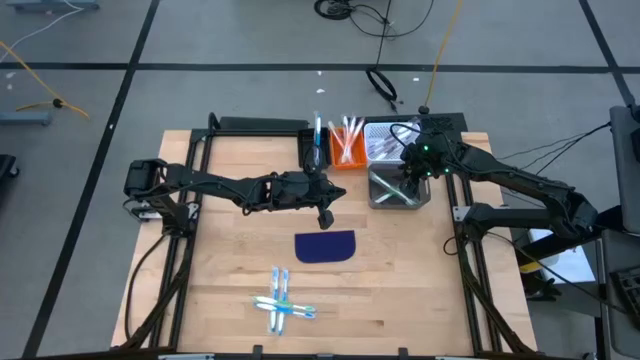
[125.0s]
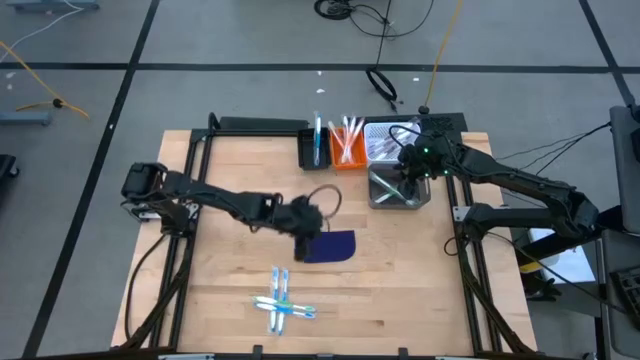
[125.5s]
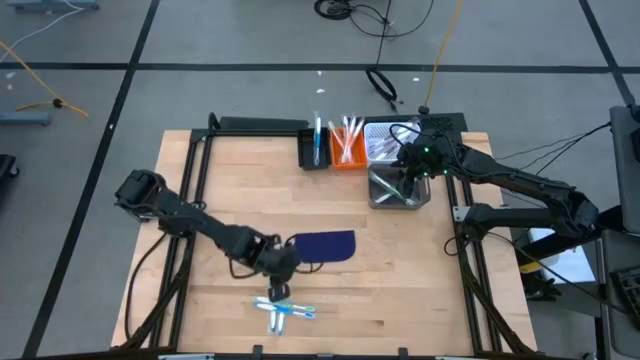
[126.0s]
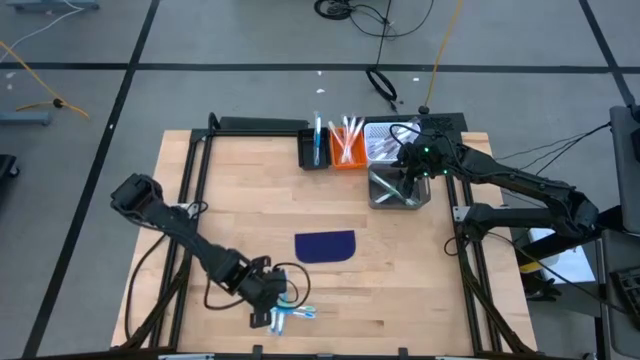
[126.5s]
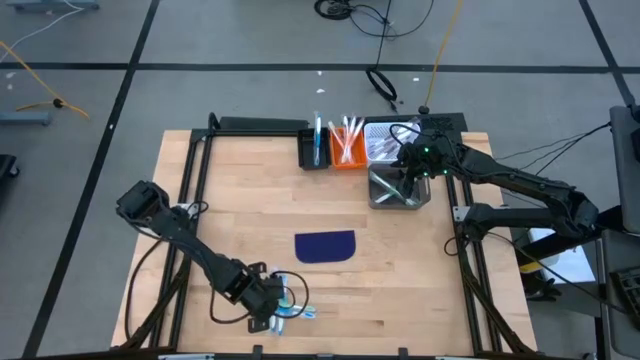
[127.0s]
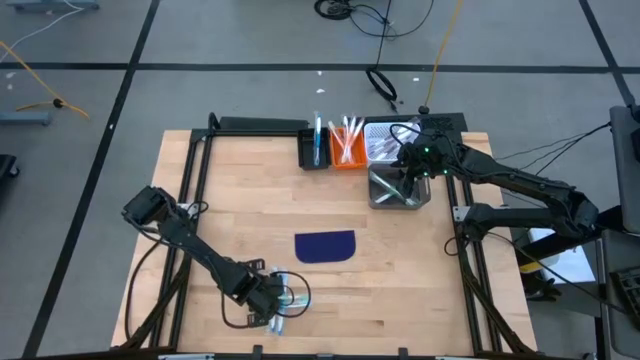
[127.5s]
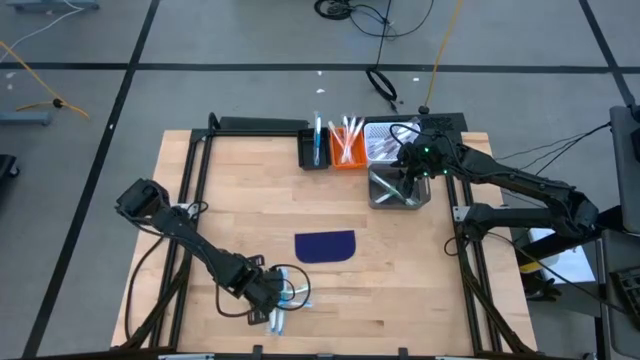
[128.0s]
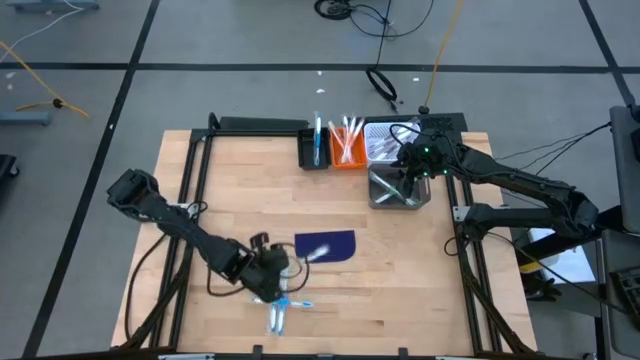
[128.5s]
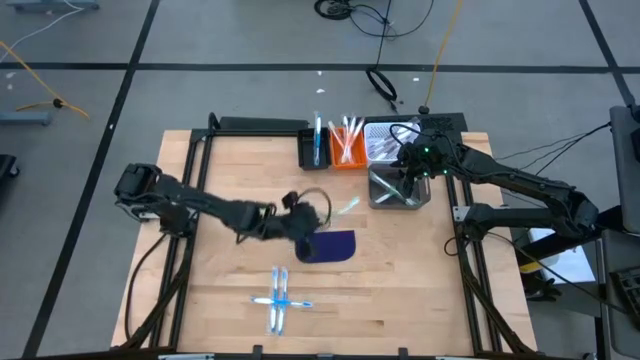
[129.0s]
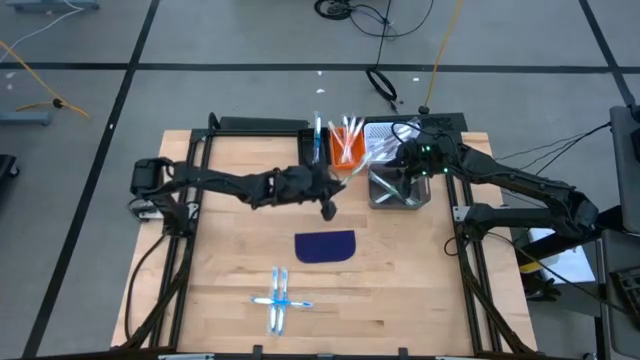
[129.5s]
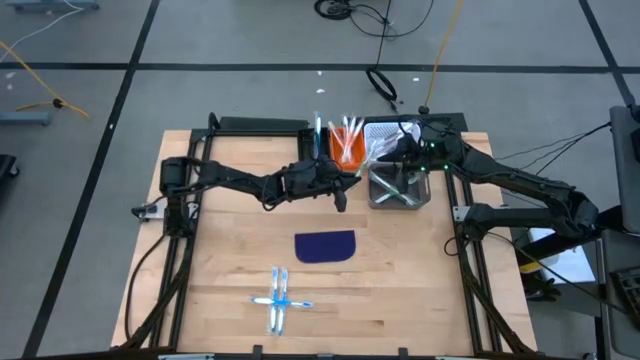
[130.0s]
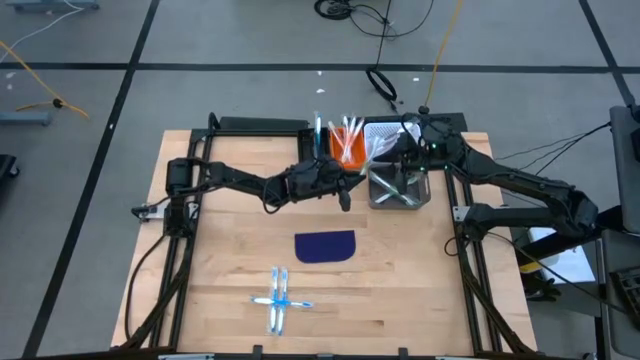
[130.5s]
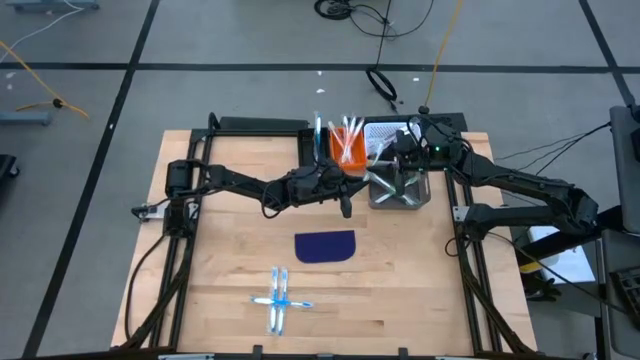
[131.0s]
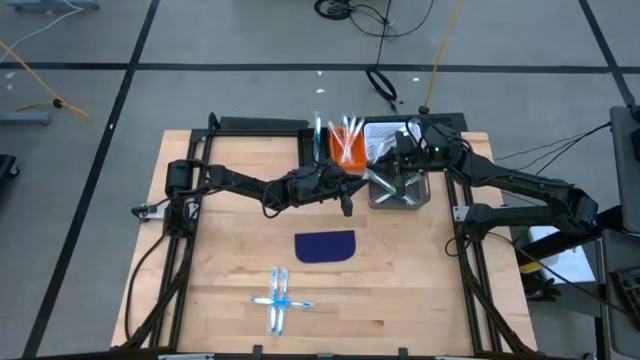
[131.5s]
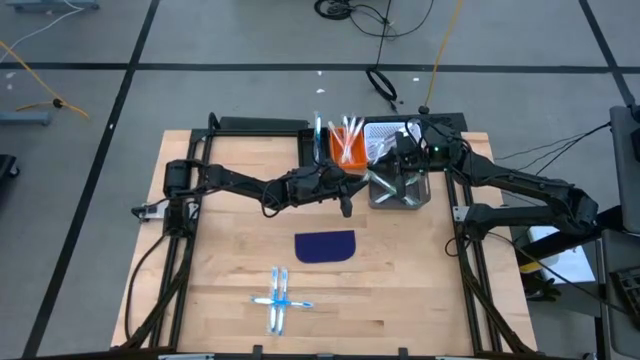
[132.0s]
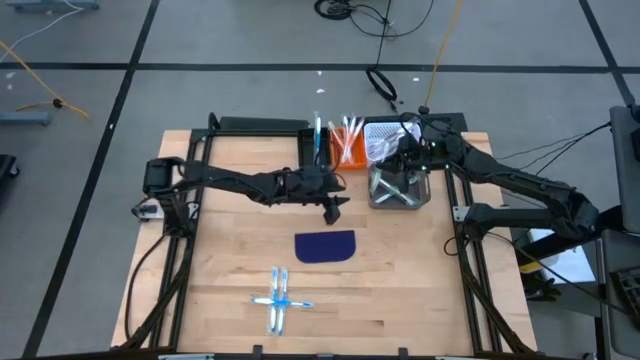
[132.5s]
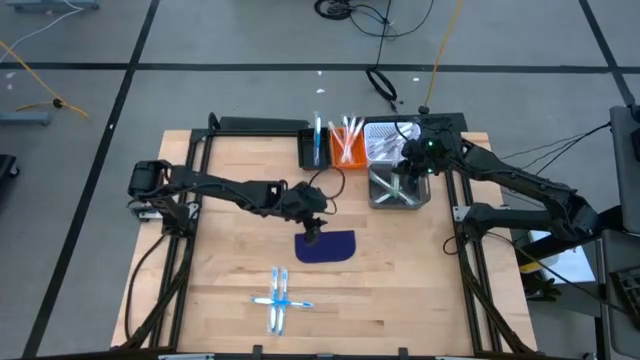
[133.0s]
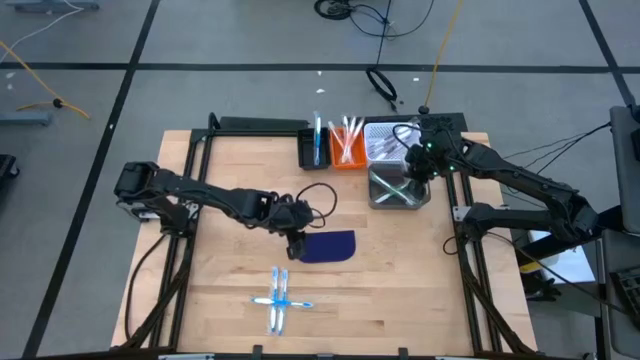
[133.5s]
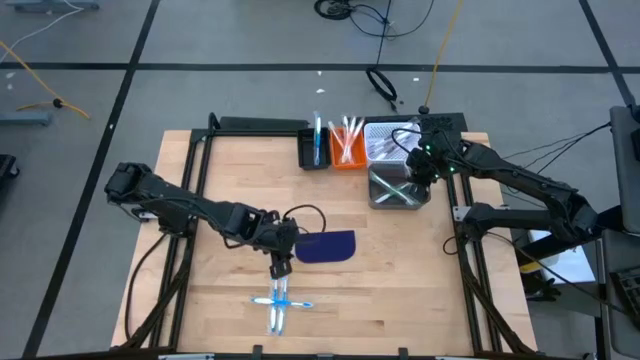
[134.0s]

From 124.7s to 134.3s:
Task: Pick & Place Toothbrushes
Put the green toothbrush into the gray bin

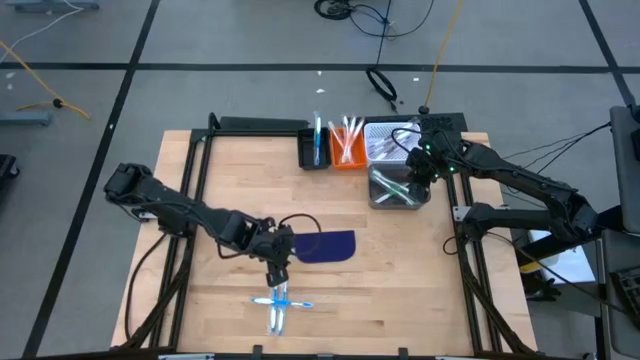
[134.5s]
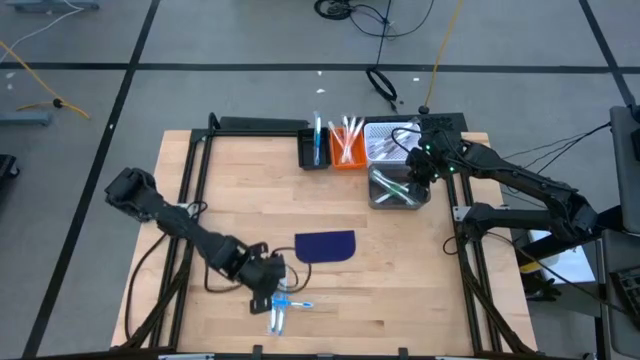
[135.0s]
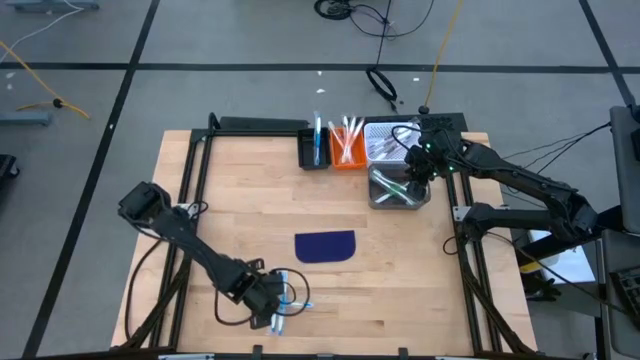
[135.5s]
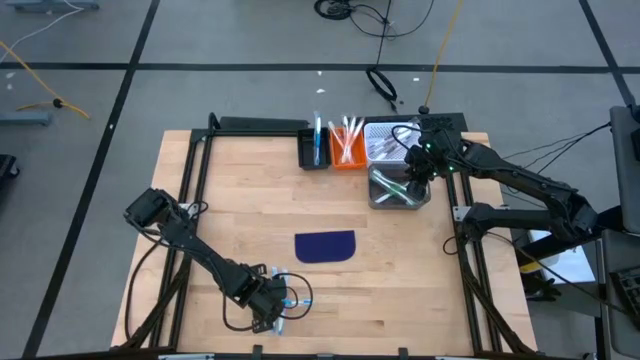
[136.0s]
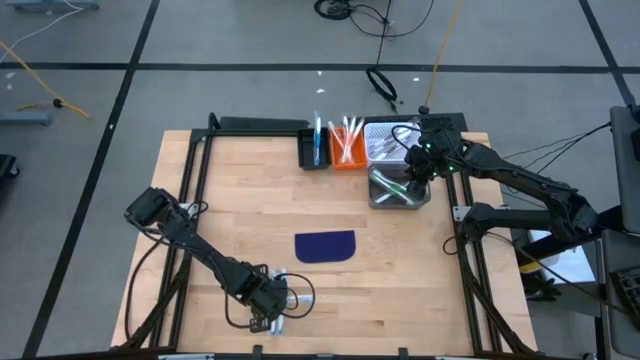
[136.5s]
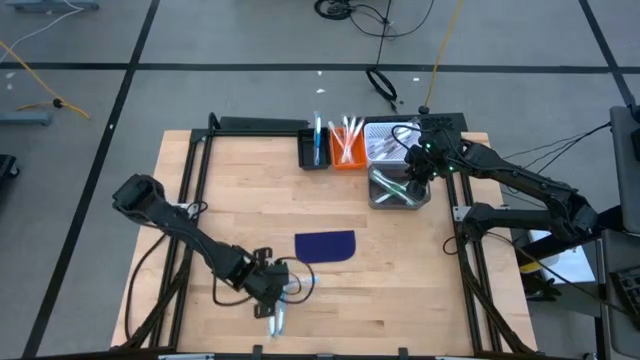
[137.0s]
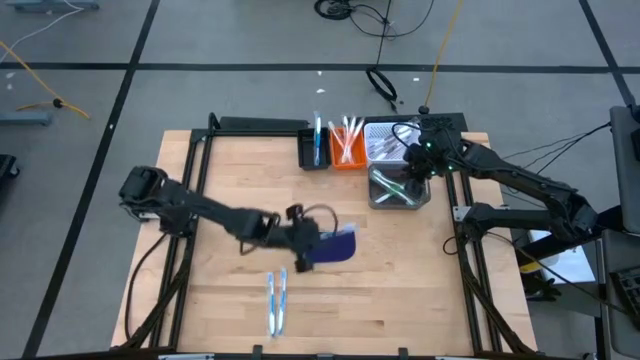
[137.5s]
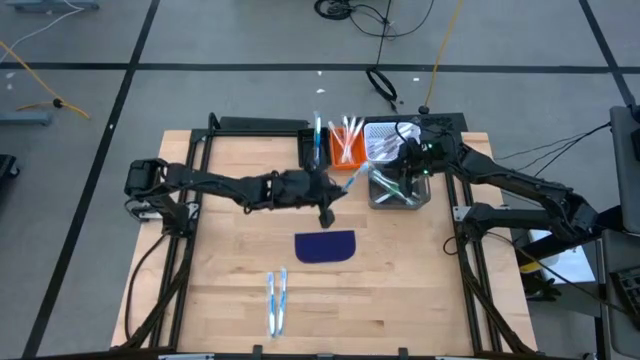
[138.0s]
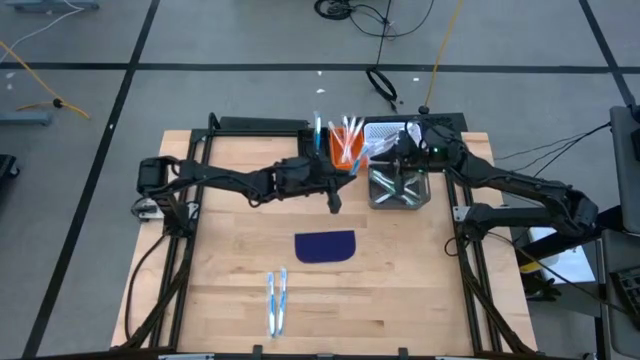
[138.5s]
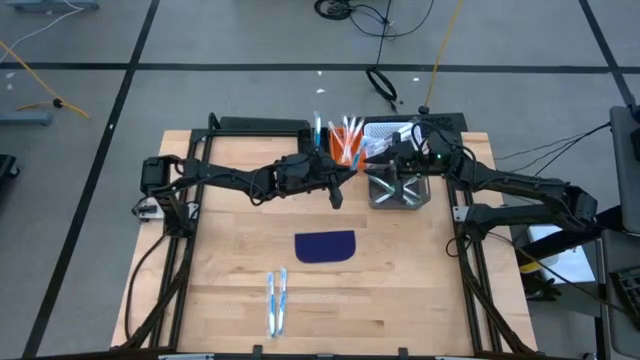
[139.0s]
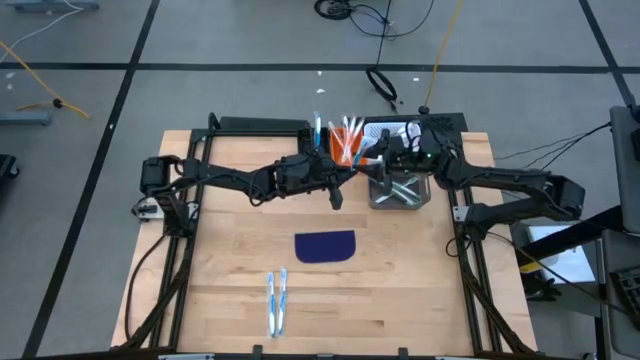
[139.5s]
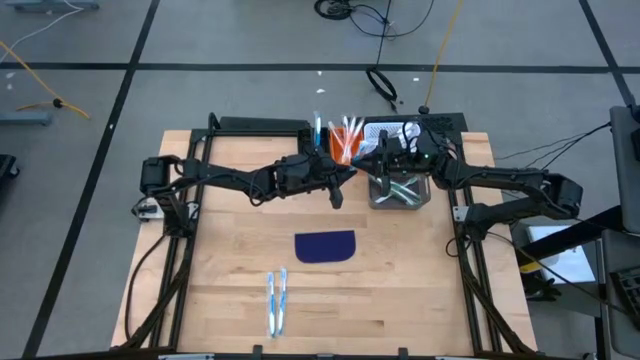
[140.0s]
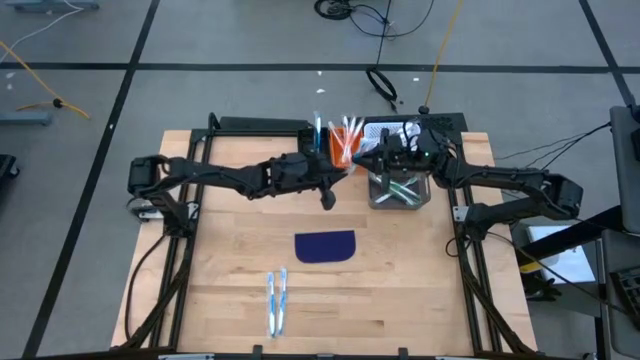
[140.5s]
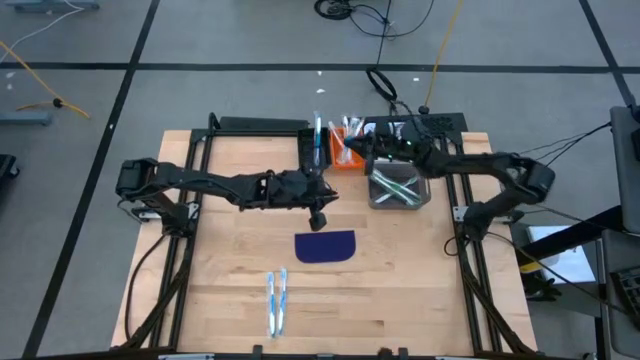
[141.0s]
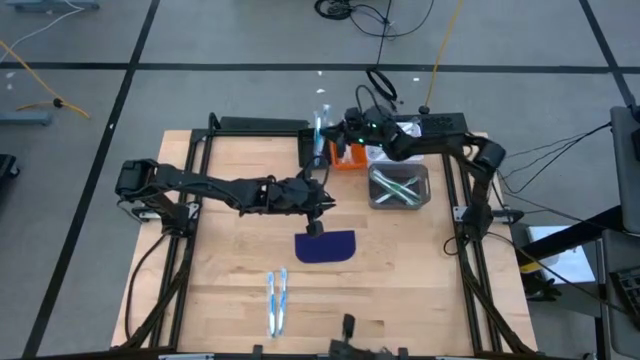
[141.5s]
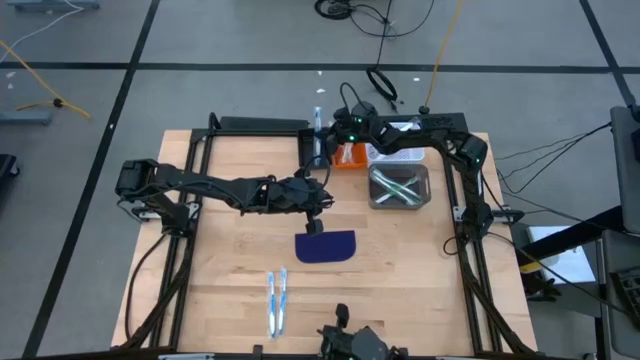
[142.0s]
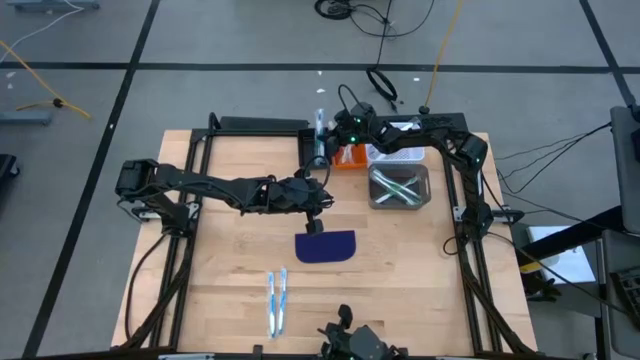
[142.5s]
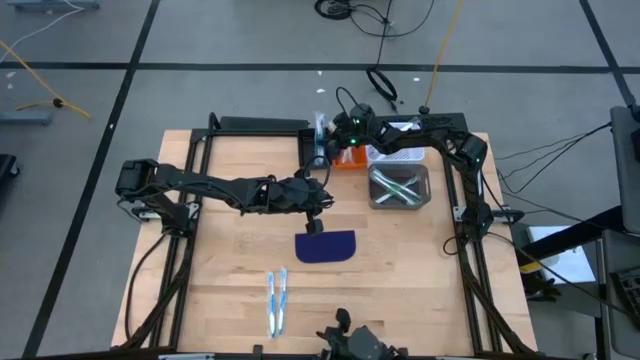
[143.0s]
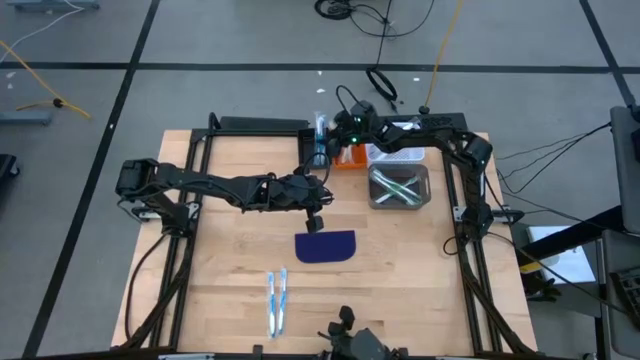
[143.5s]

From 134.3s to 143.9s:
Put the blue toothbrush into the black bin

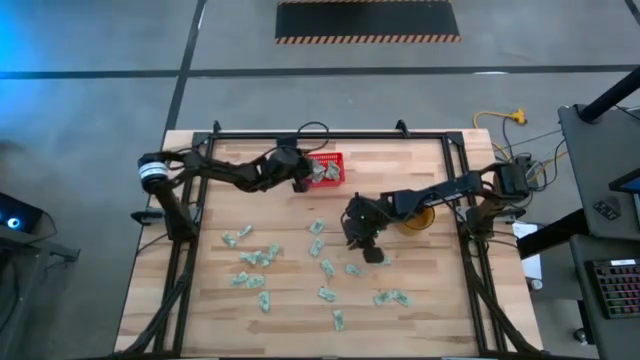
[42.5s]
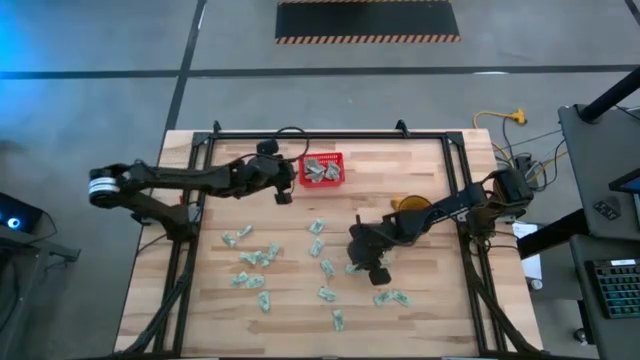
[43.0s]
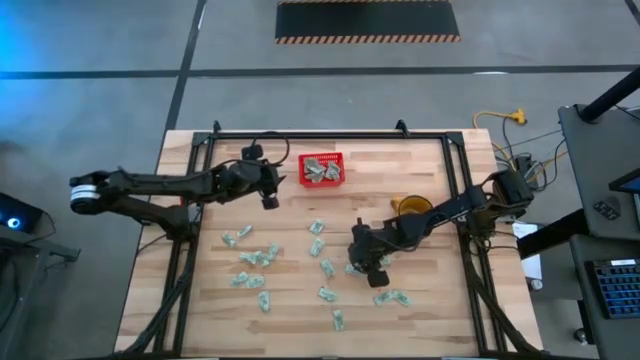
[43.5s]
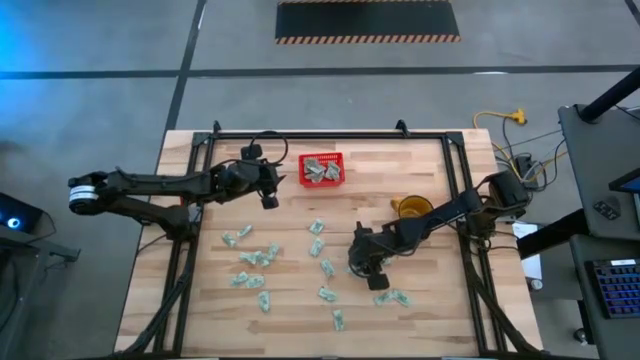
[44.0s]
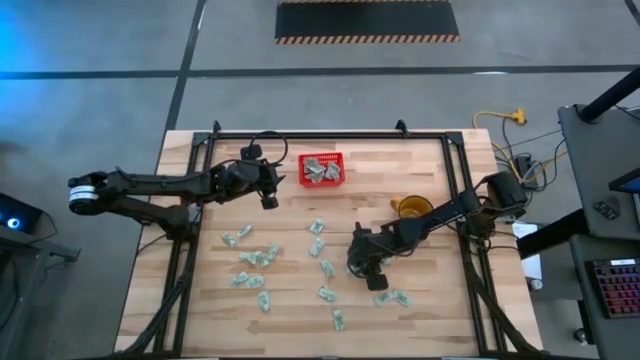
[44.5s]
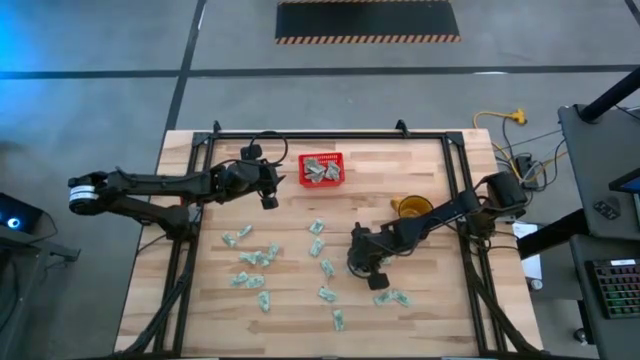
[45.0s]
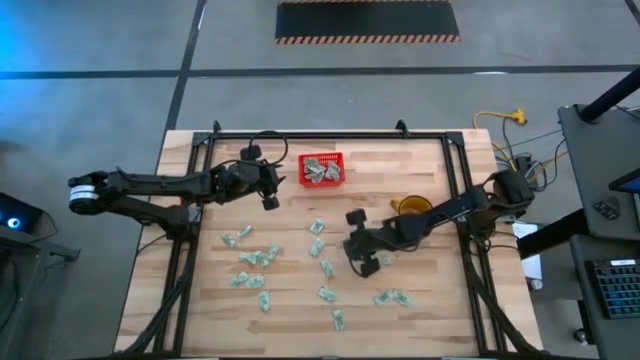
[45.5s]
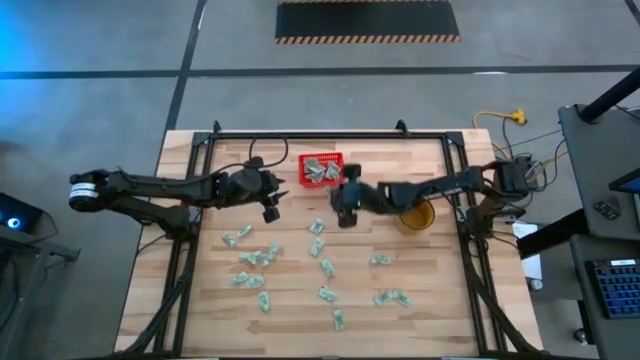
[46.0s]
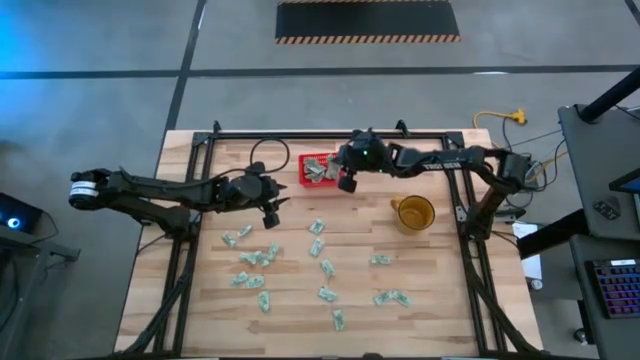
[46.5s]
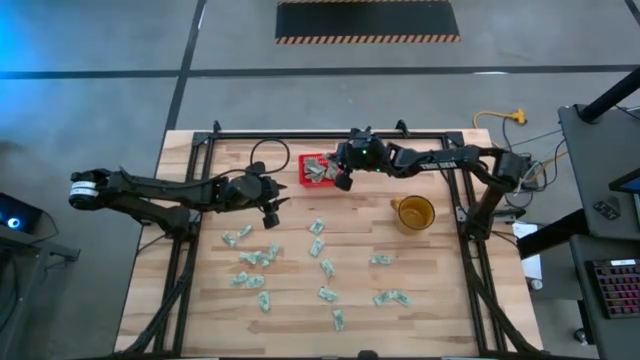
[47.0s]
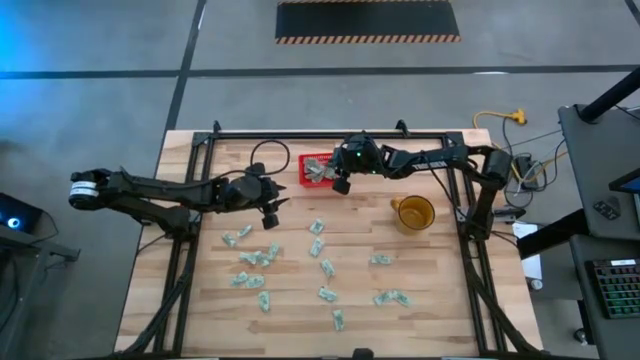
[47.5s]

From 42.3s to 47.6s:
Task: Pick and place Stevia / Truvia into bins
Put the white stevia packet into the red bin
